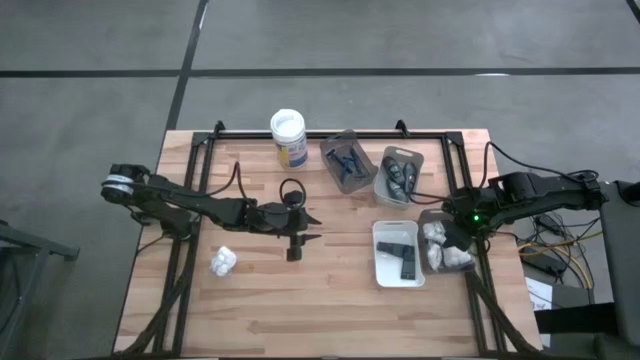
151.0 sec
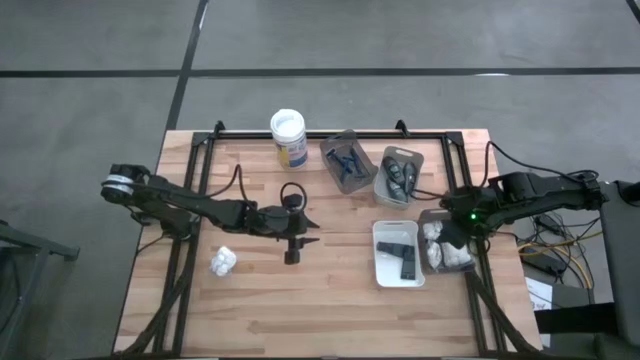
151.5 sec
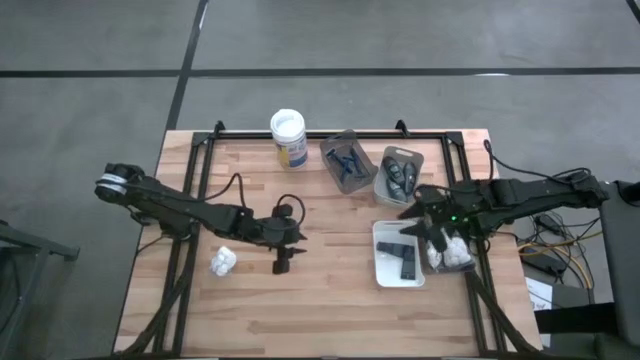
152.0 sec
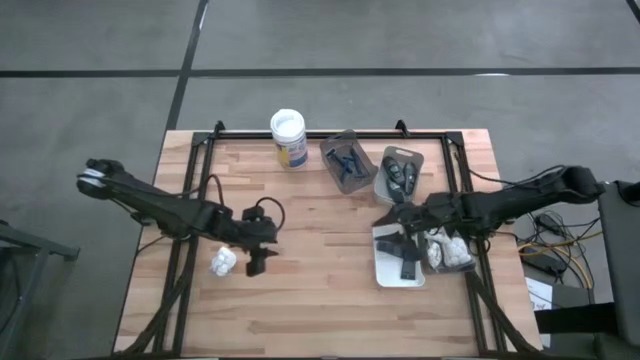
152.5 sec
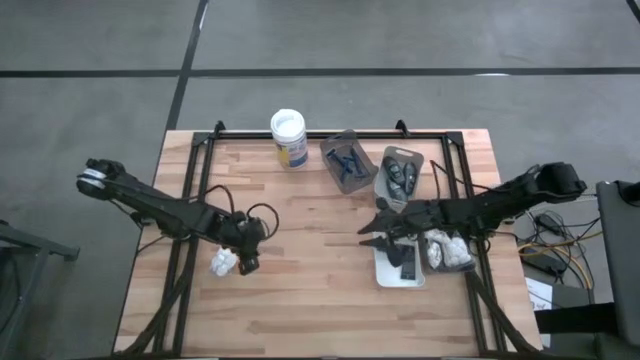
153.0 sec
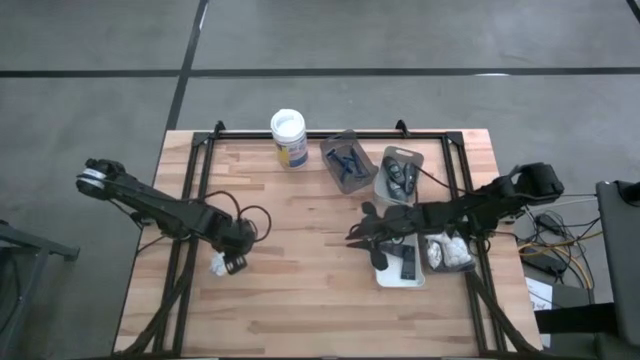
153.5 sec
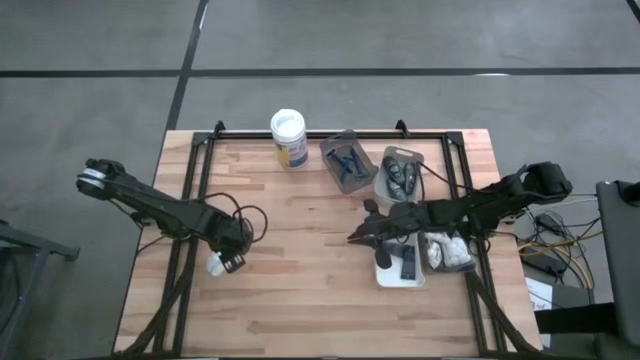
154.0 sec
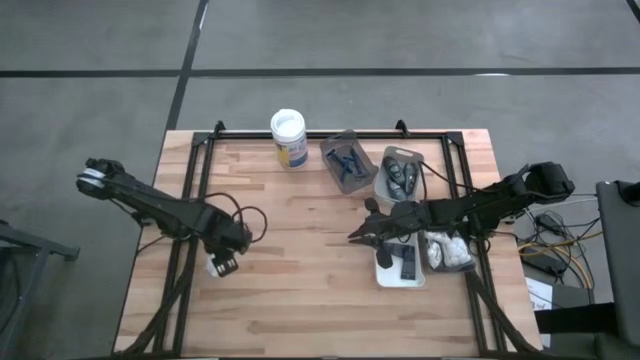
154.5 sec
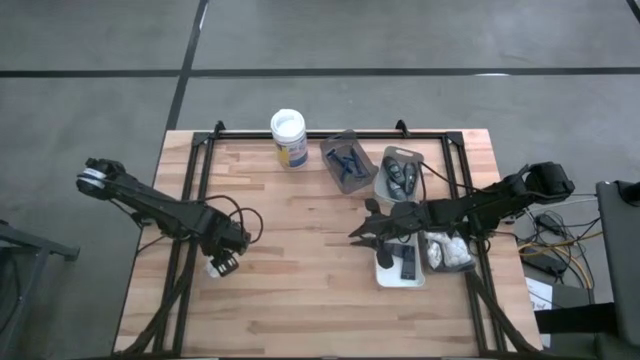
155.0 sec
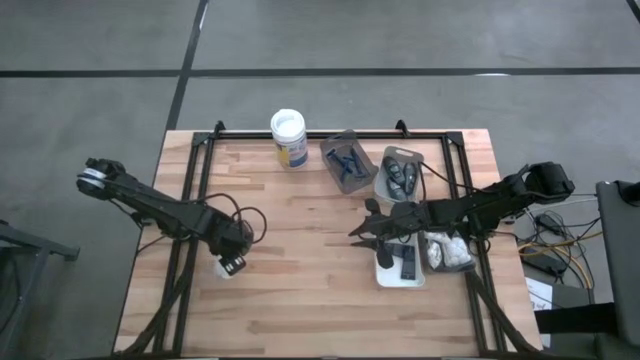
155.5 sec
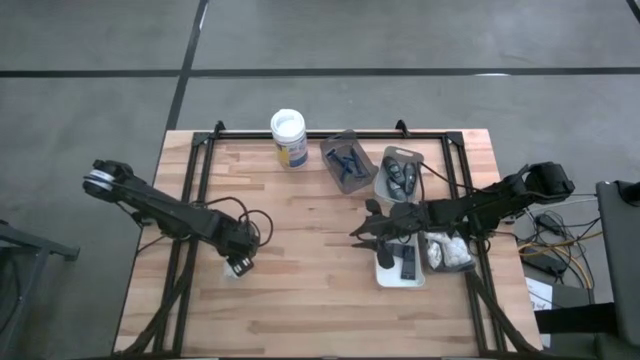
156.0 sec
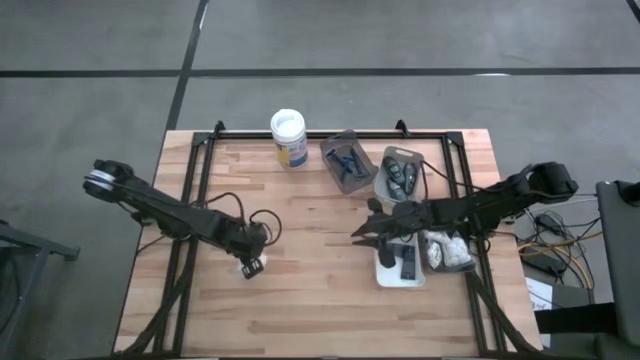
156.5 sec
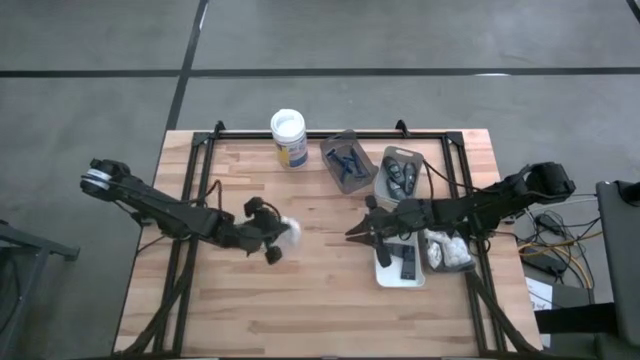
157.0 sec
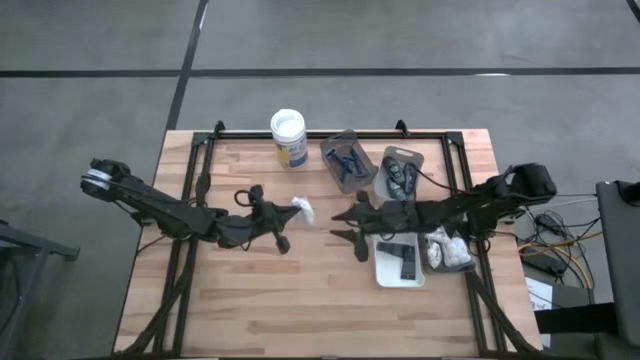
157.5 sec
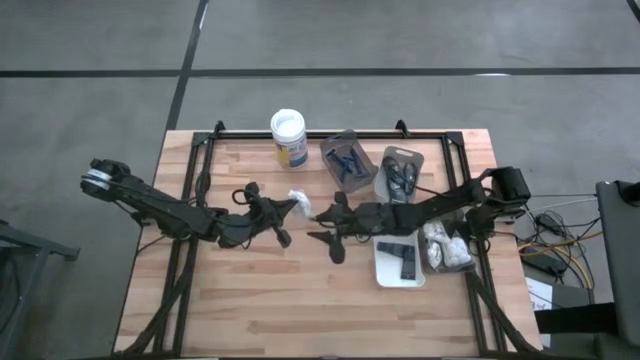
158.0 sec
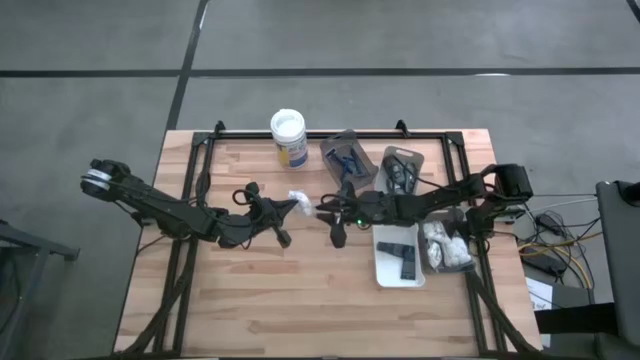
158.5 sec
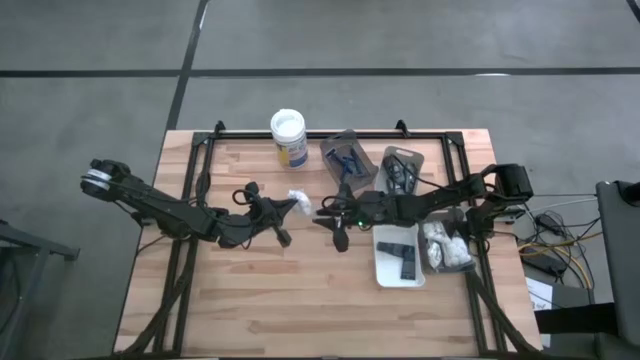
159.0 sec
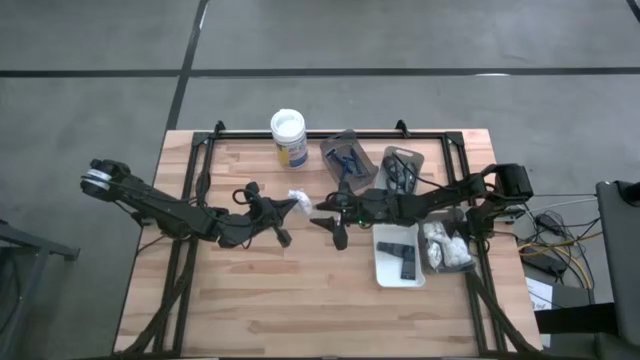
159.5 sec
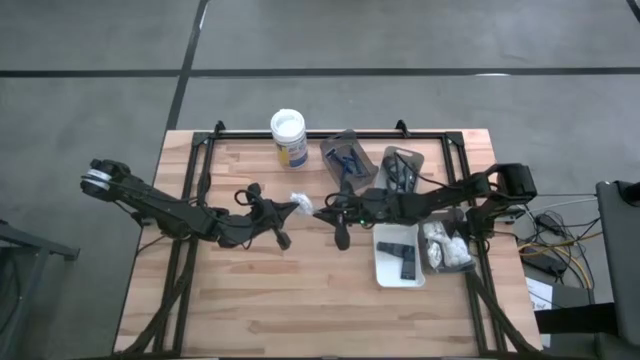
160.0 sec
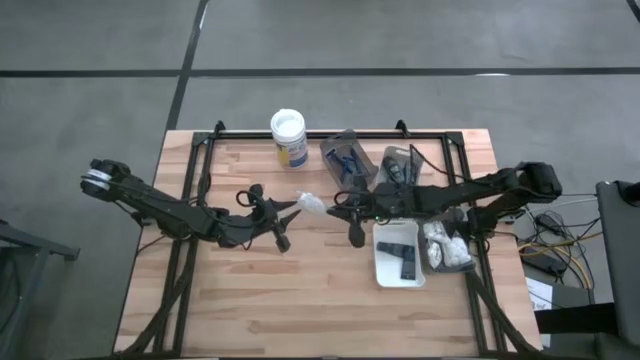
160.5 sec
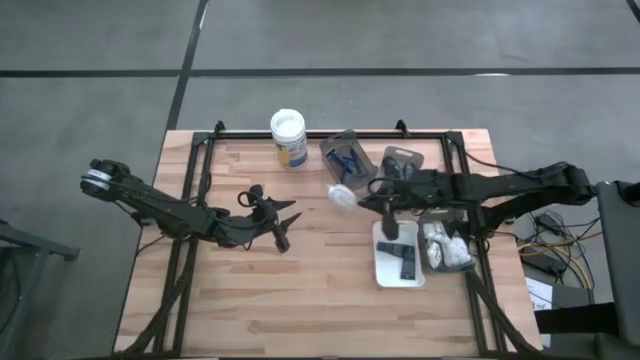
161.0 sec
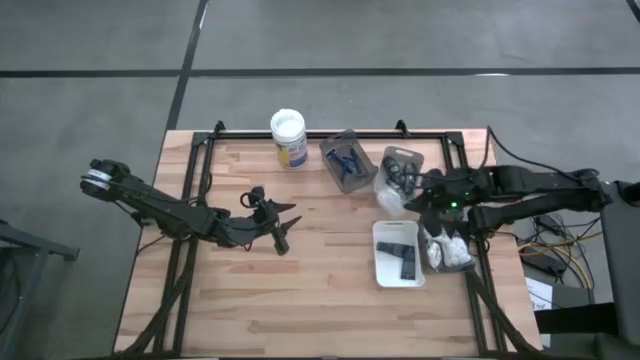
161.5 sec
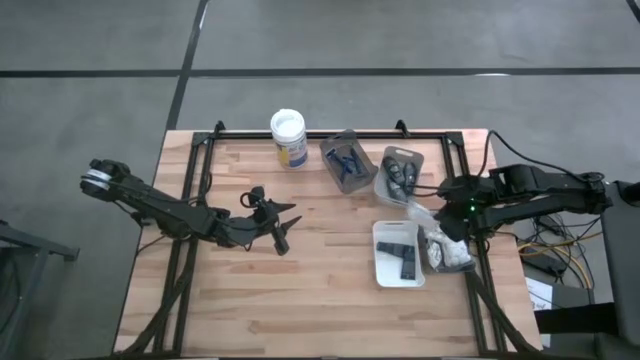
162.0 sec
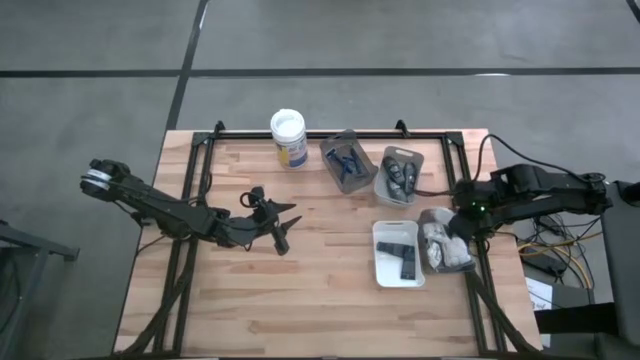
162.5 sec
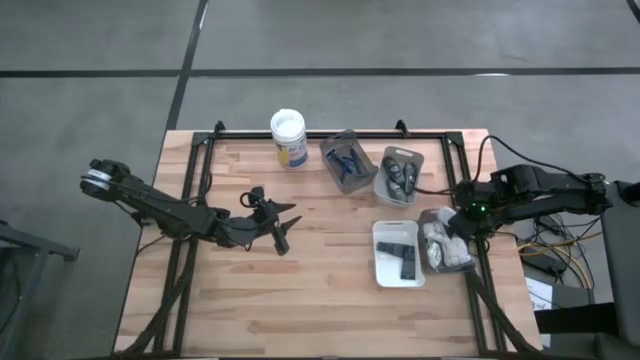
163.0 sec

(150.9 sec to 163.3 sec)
Task: Pick & Place Travel size toiletries
Put the white cotton pack into the bottom black bin

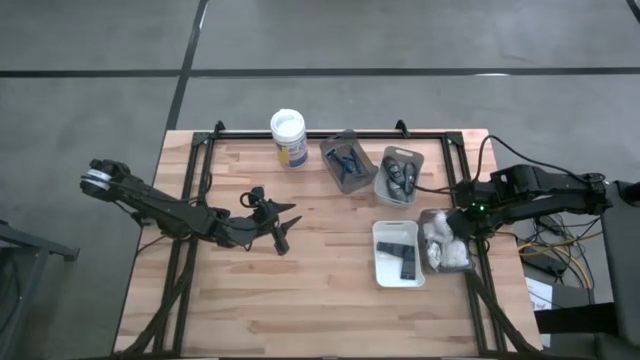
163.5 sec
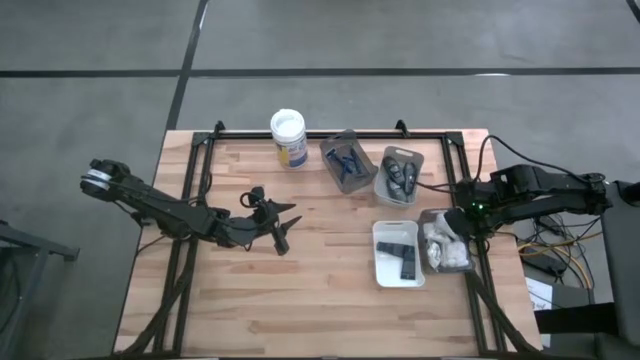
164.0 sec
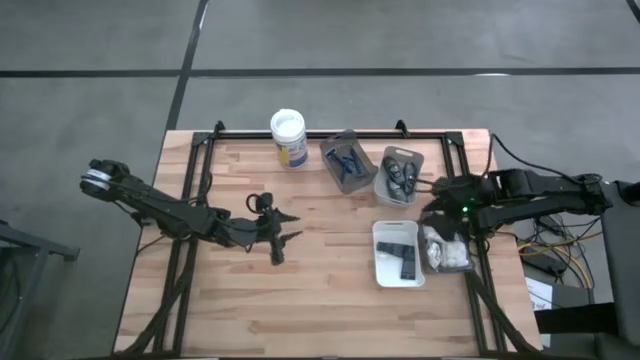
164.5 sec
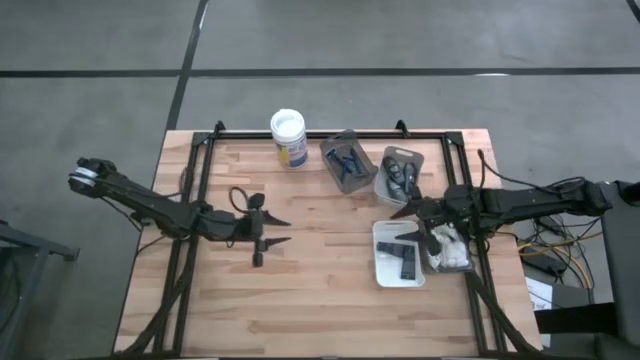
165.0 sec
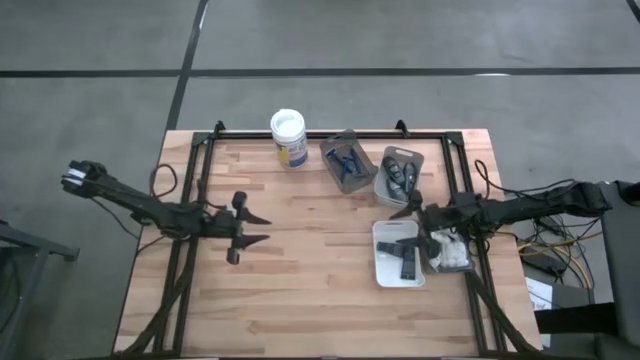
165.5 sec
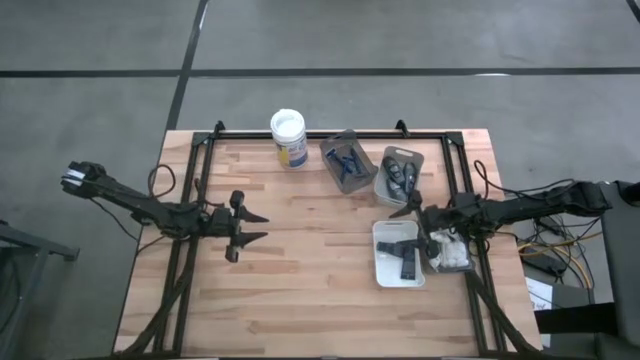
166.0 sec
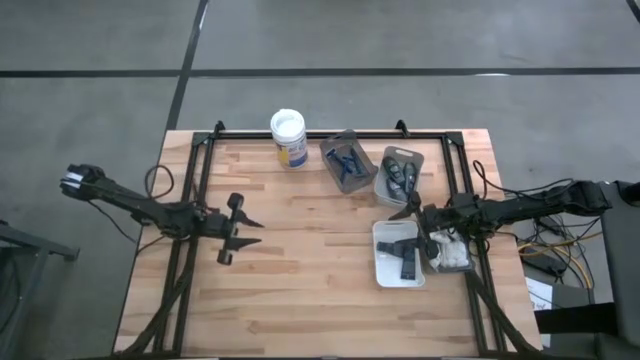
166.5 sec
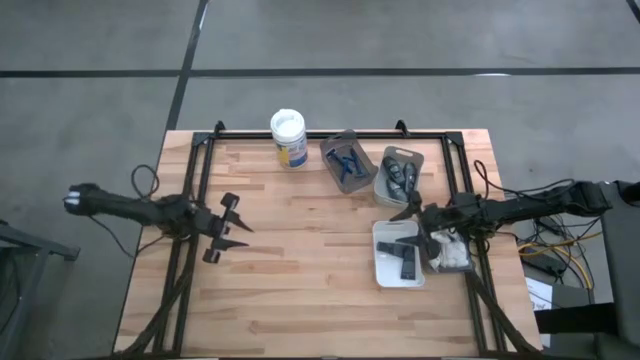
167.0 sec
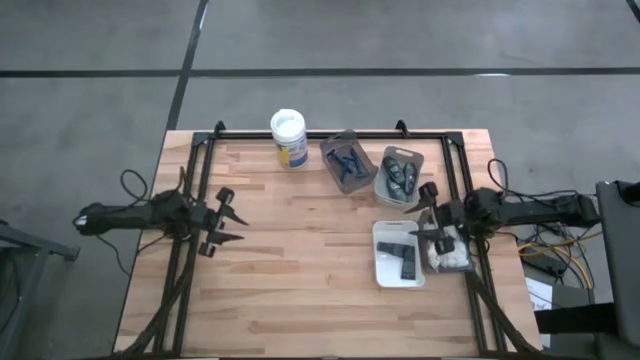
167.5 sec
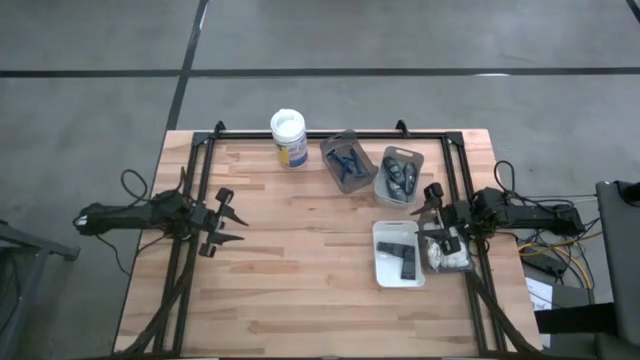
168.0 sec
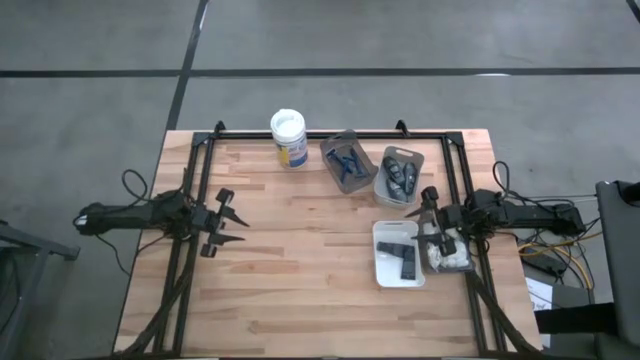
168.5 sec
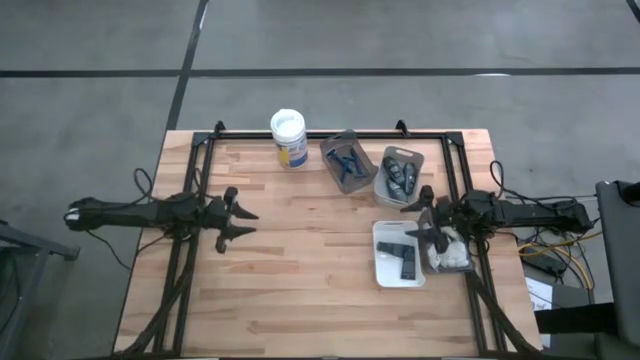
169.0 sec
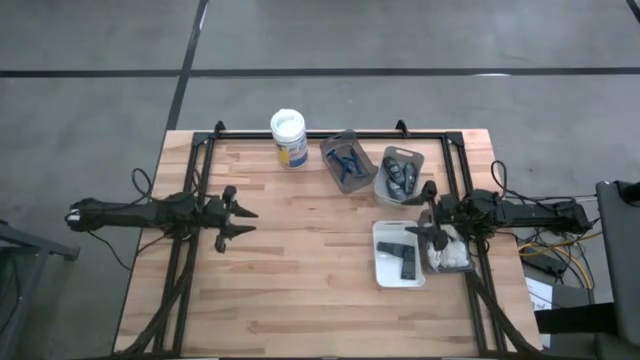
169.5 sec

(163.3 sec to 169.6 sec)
Return to Home Position

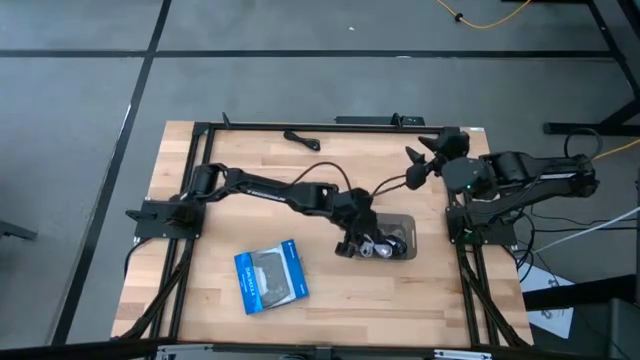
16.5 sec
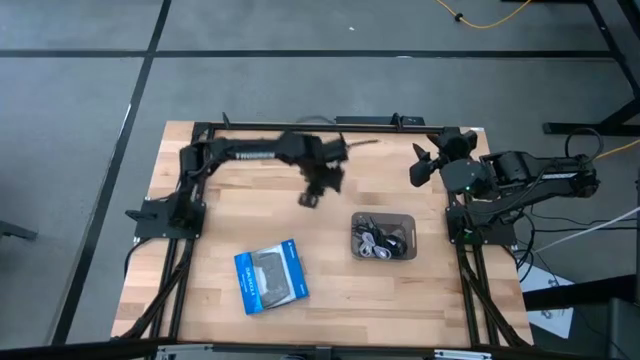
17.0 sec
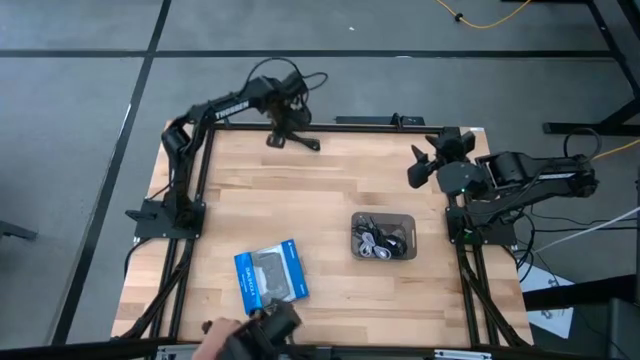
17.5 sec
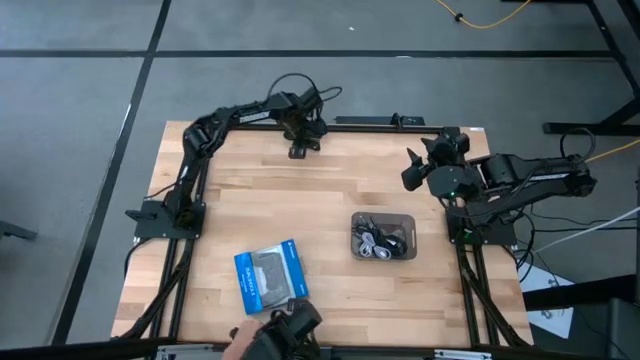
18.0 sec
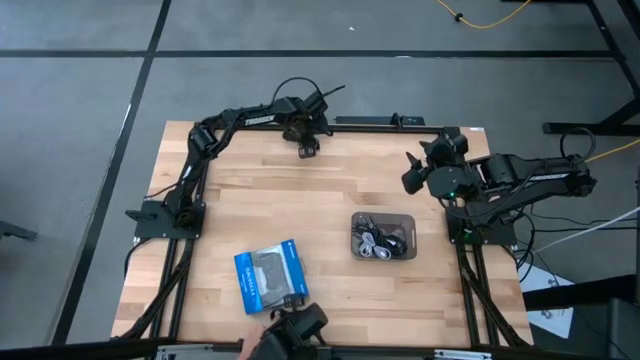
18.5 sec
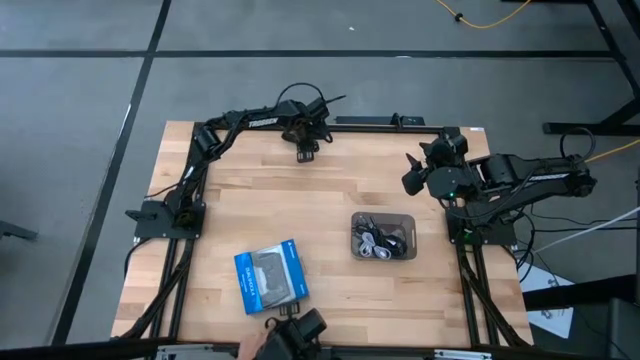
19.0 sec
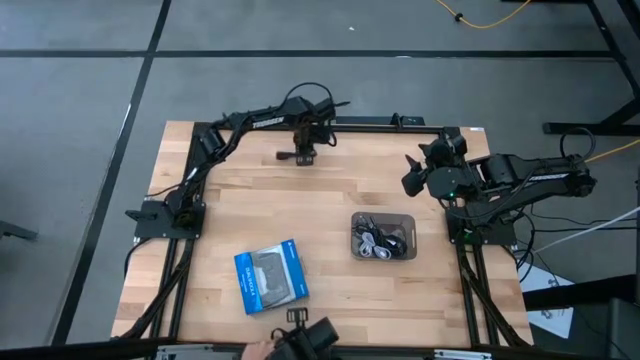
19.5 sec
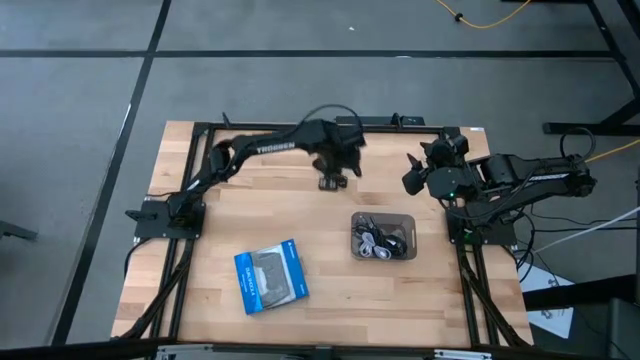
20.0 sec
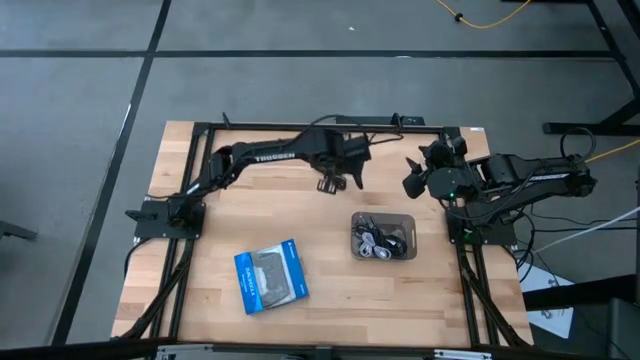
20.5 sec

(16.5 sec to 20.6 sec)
Task: Pick and place USB-C Cables
Put the black charger cable into the black bin
